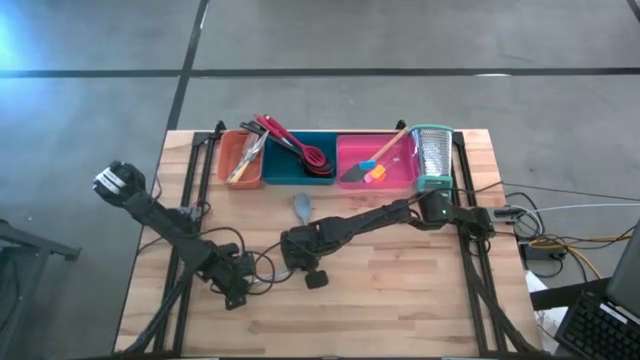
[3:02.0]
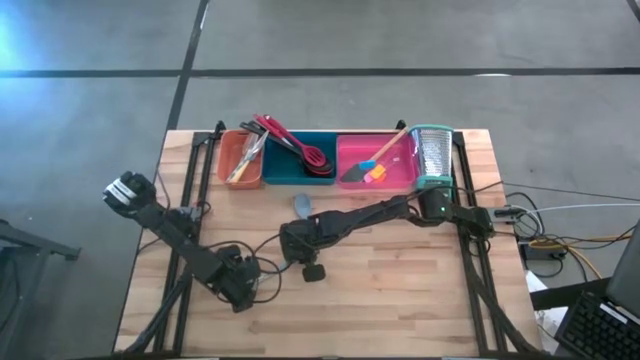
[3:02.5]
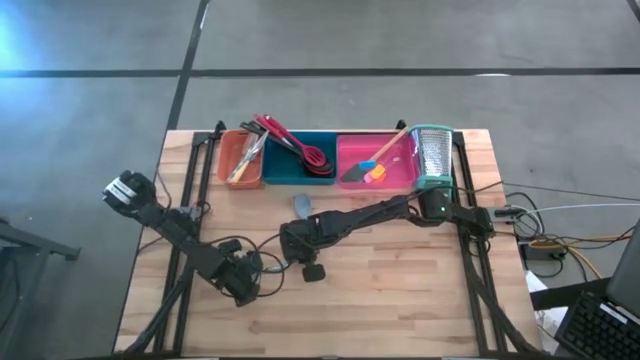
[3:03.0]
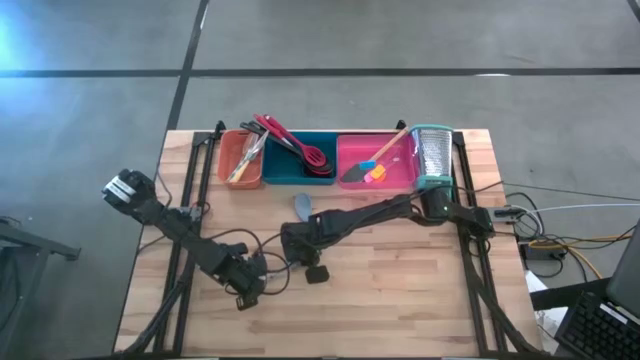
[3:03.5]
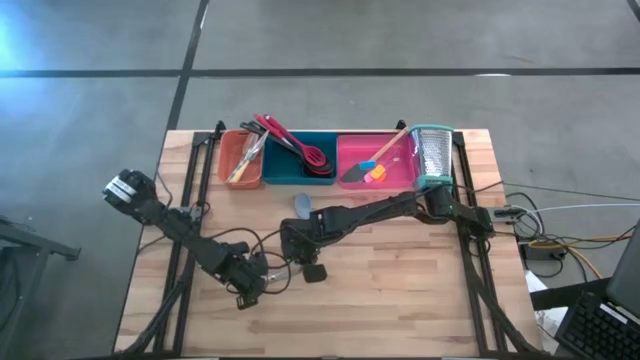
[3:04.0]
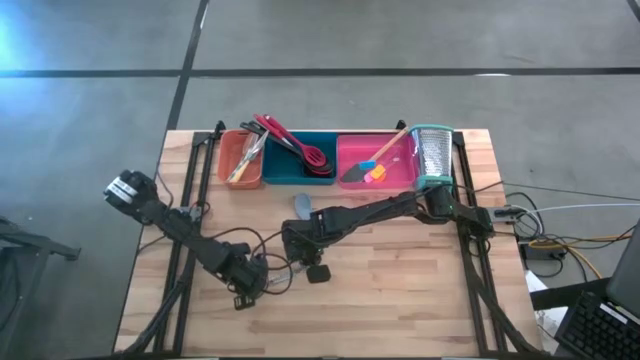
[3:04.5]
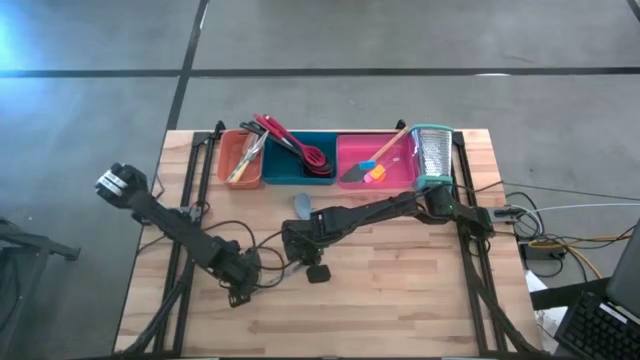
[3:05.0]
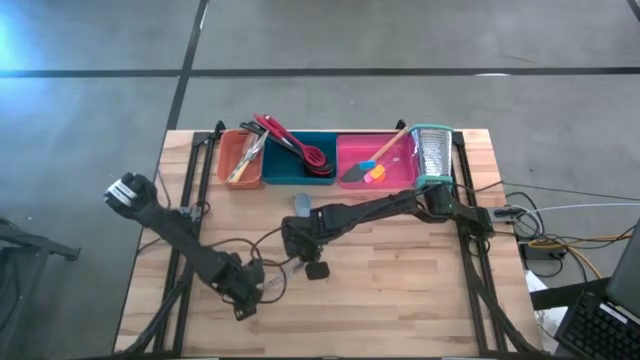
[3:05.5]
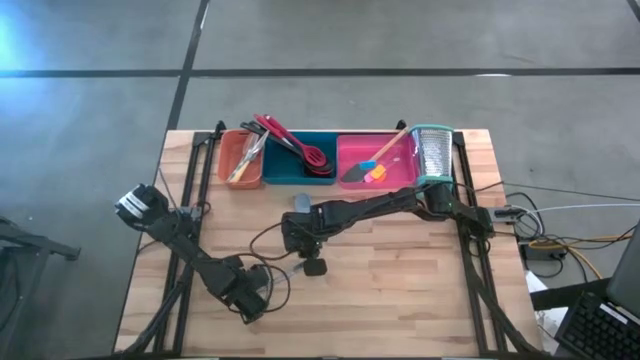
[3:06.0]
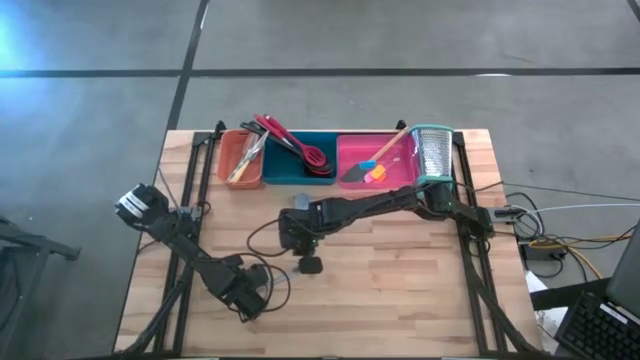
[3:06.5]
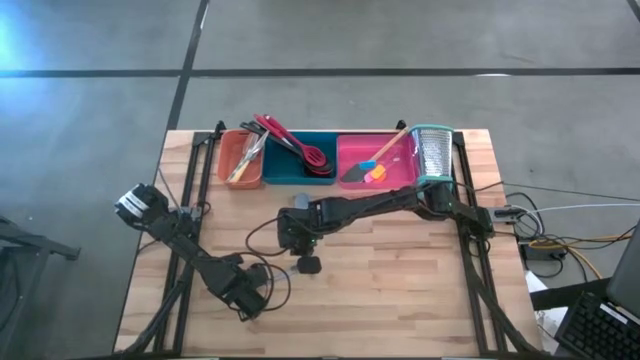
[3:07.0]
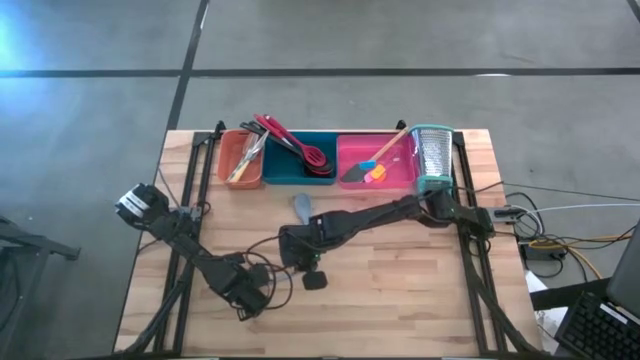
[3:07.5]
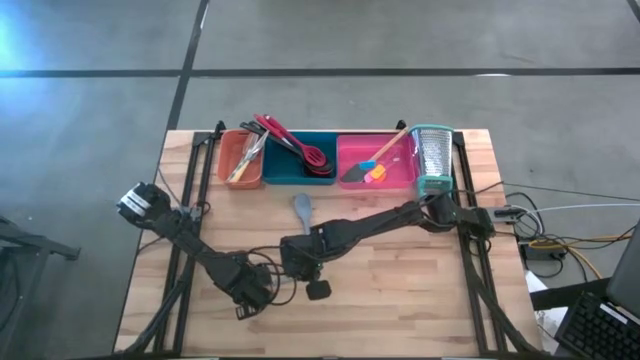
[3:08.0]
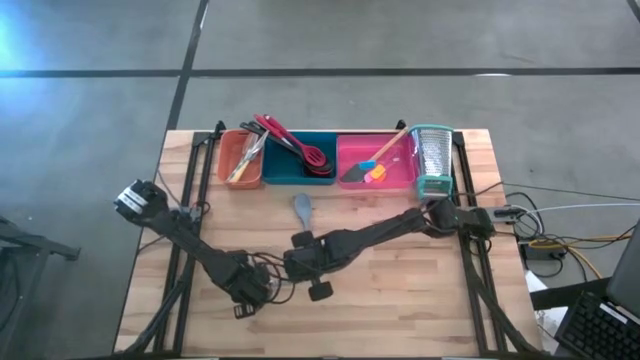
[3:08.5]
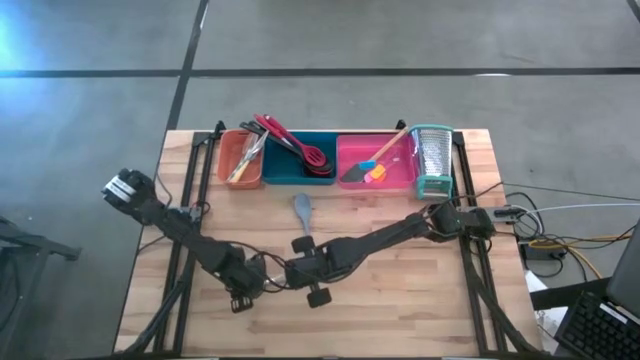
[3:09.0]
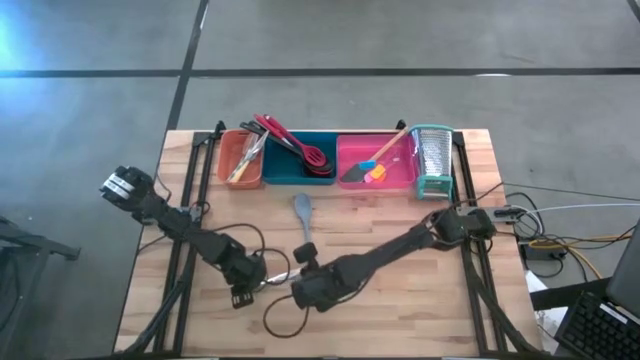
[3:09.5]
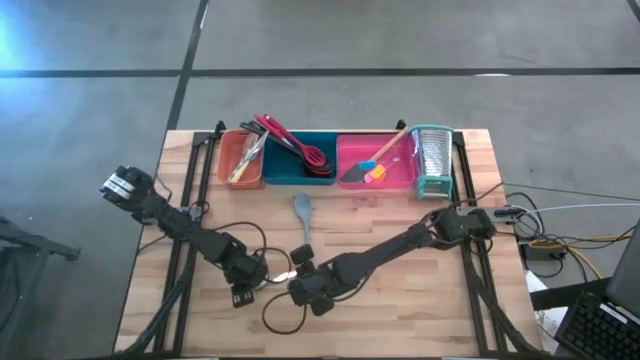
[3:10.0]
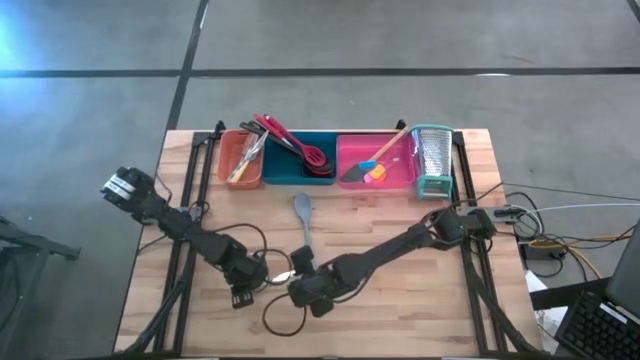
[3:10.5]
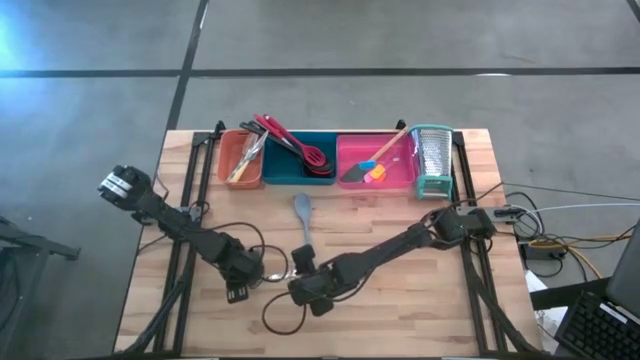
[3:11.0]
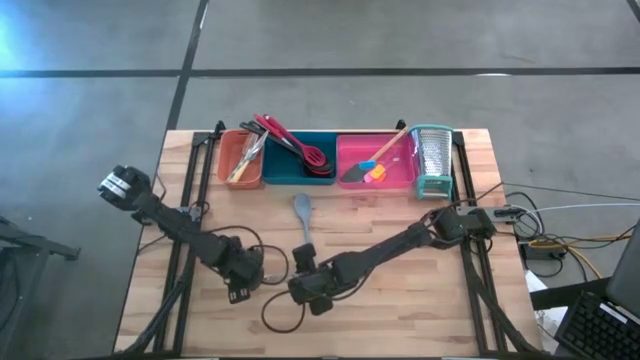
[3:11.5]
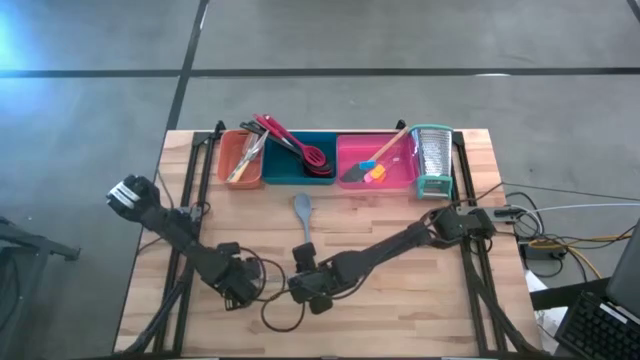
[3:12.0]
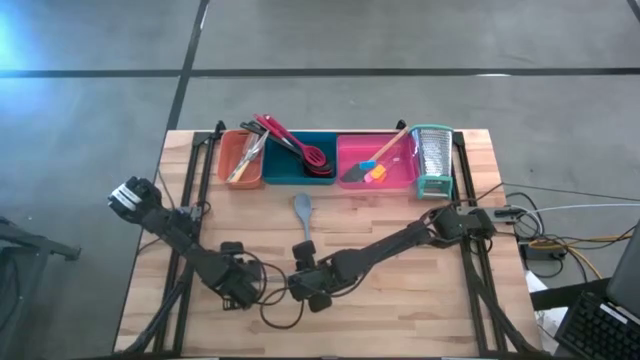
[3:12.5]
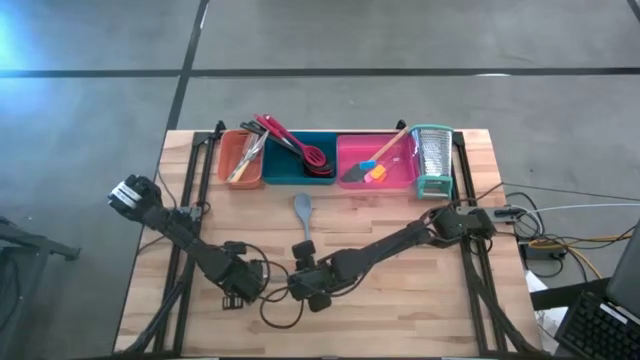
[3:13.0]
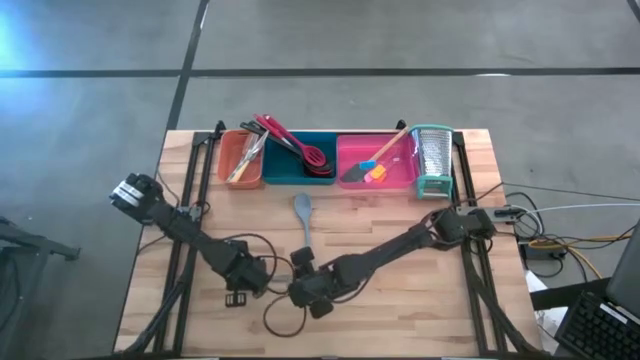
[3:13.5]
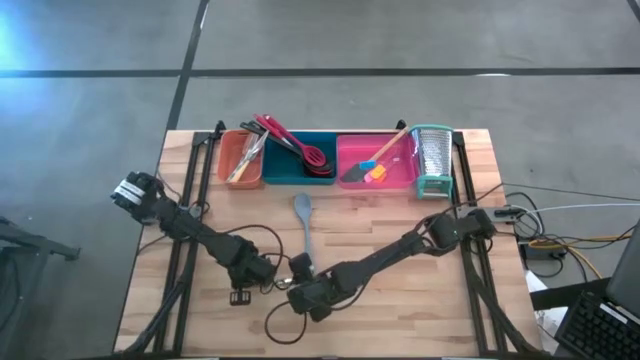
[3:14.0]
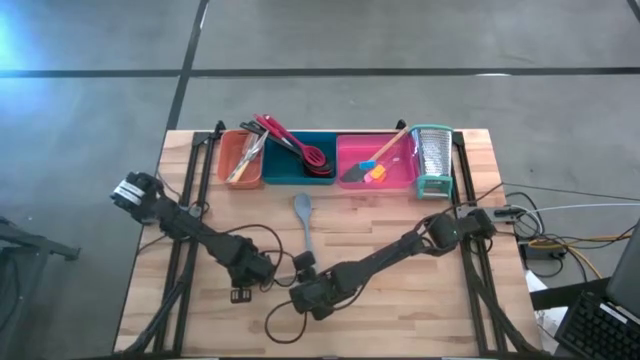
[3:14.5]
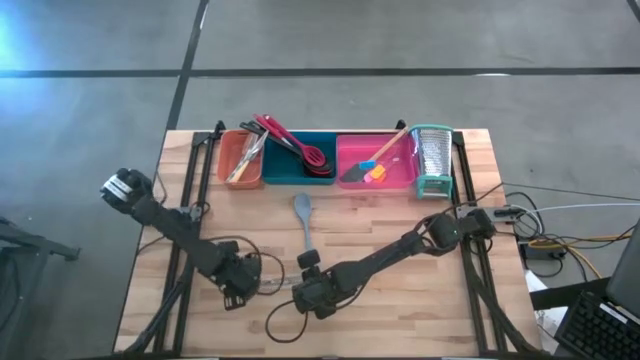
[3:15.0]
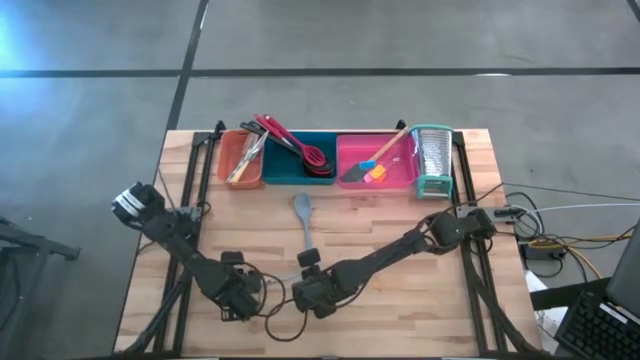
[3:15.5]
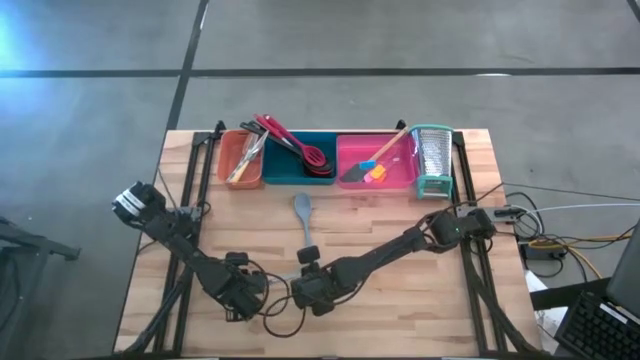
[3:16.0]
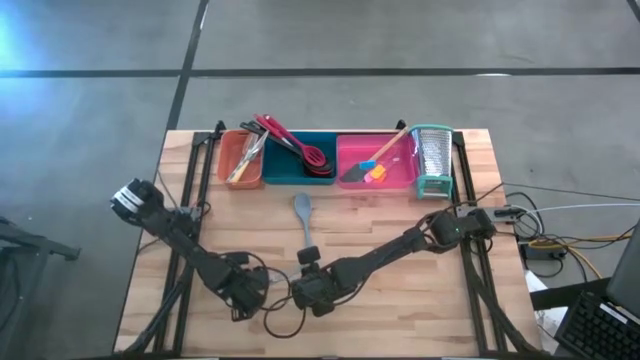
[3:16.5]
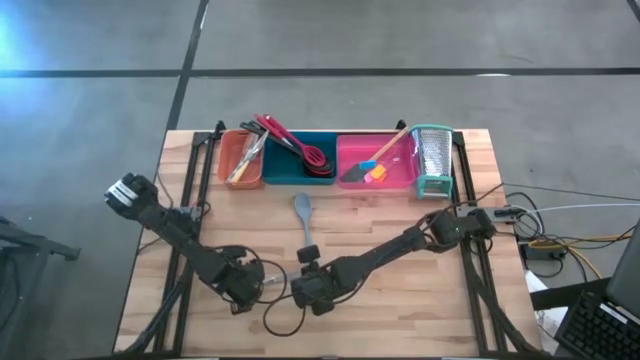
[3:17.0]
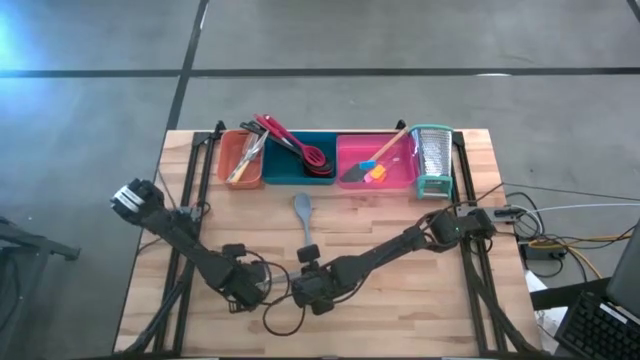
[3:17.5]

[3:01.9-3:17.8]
Task: Pick & Place Kitchen Items
Put the silver knife into the orange bin

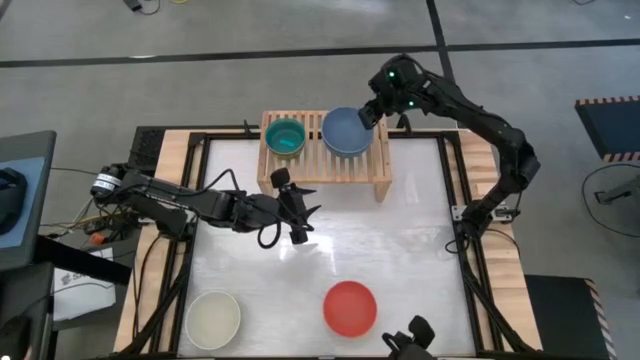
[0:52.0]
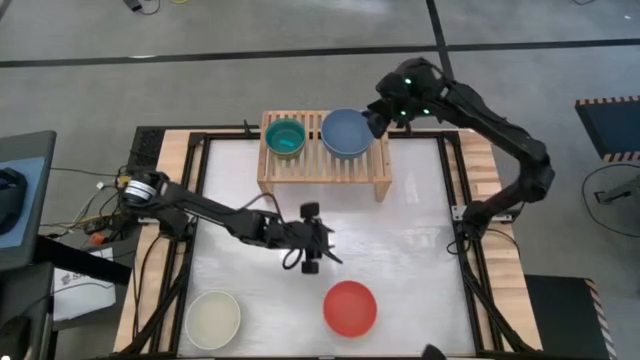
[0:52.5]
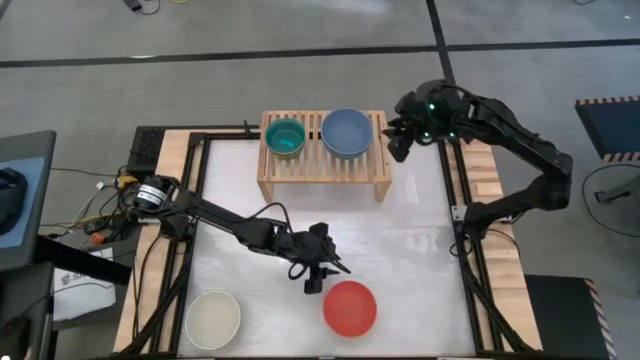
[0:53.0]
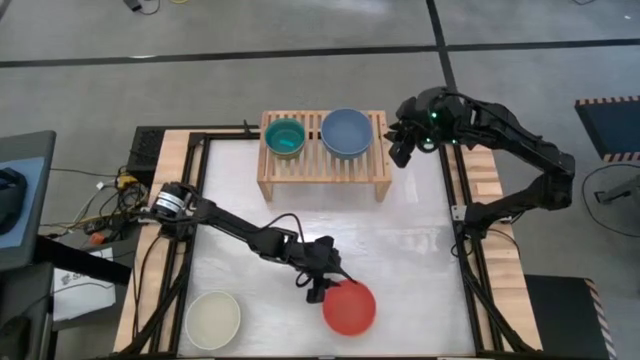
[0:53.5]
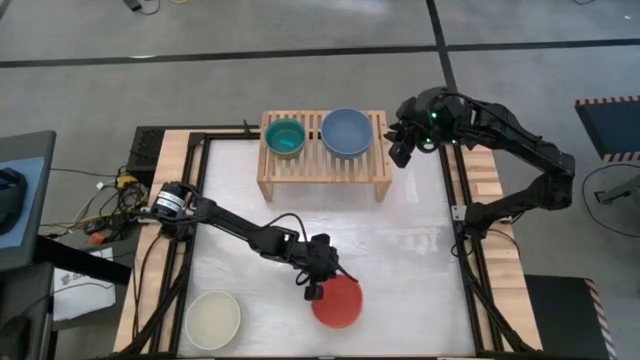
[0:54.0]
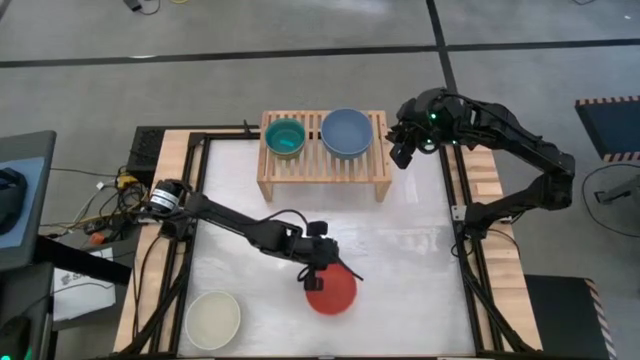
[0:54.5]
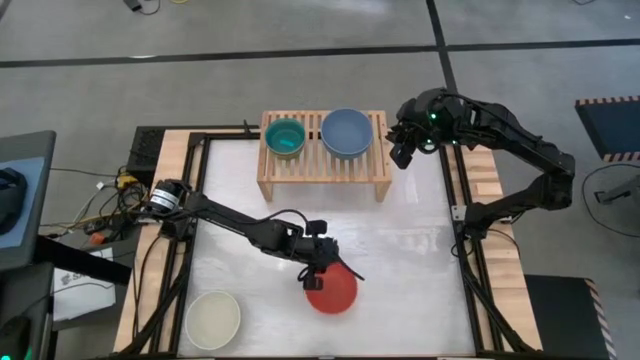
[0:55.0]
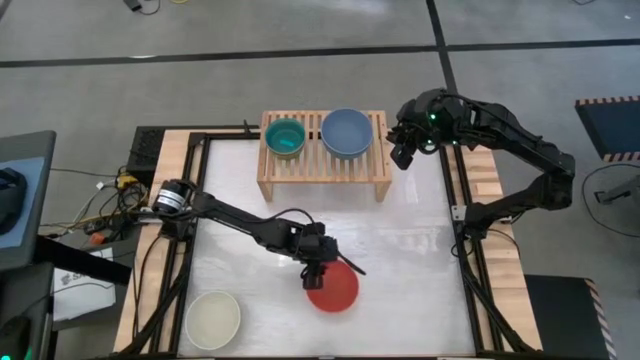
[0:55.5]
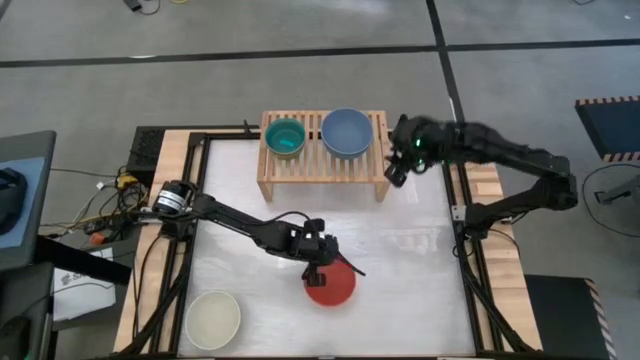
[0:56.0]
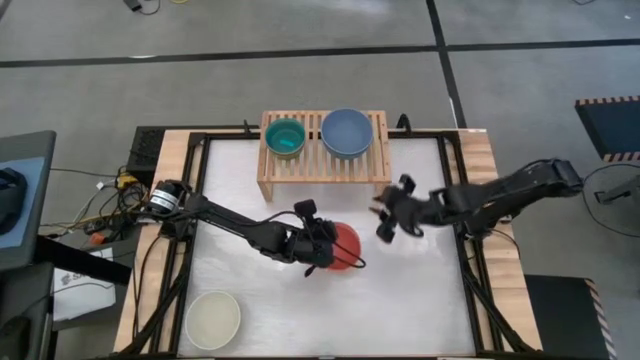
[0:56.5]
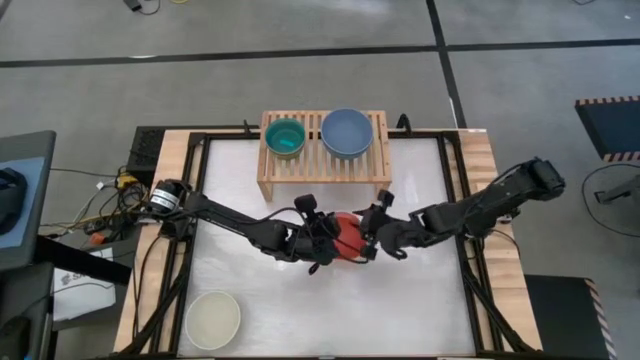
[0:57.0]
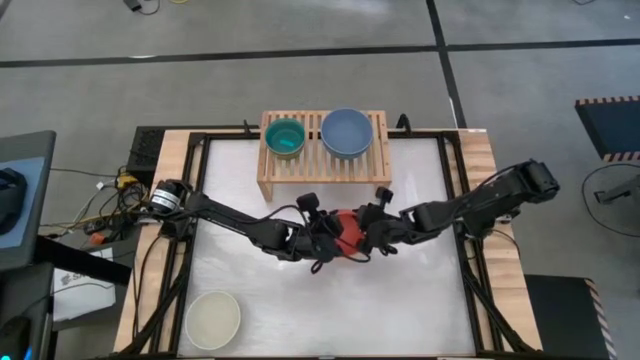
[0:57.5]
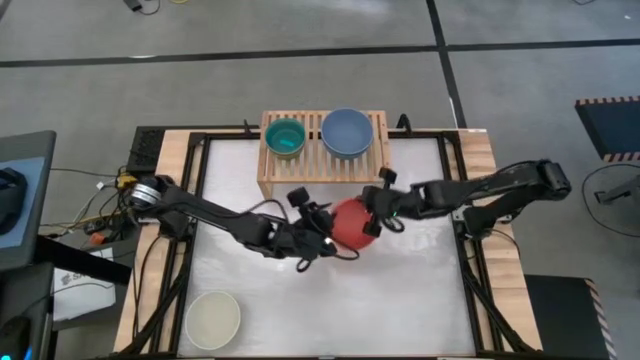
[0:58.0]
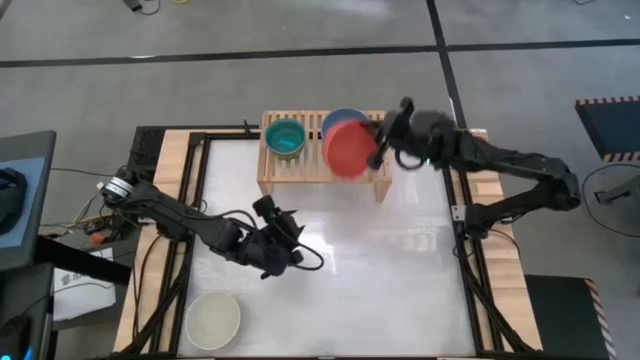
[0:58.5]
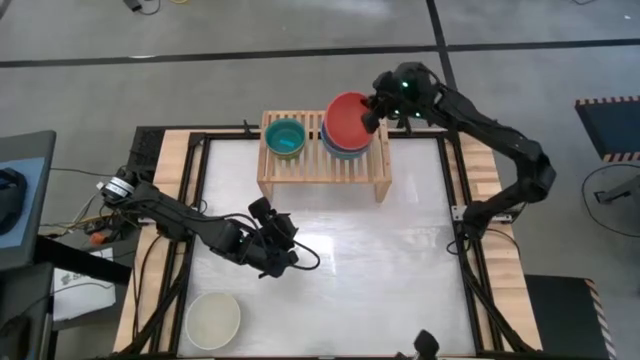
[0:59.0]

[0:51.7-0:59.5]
Task: Place and stack bowls onto a shelf
Stack the orange bowl on top of the blue bowl
